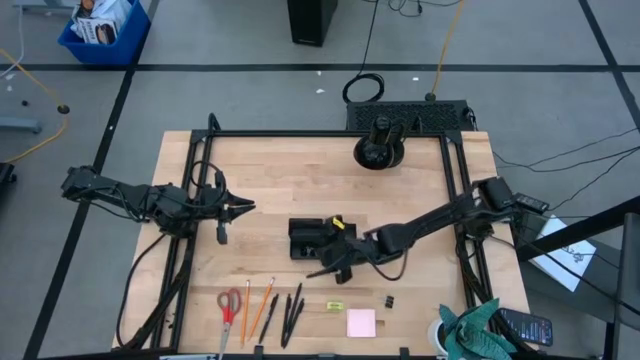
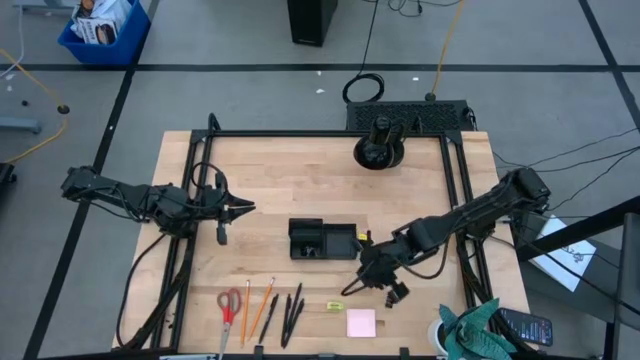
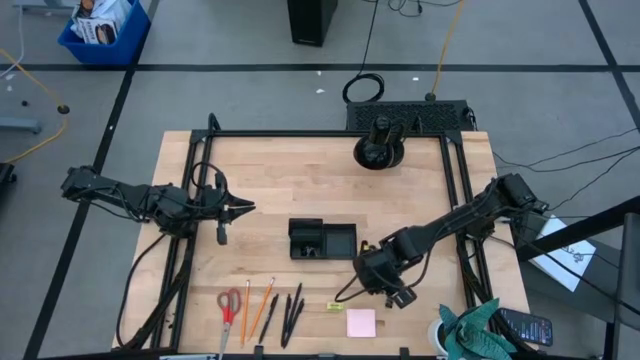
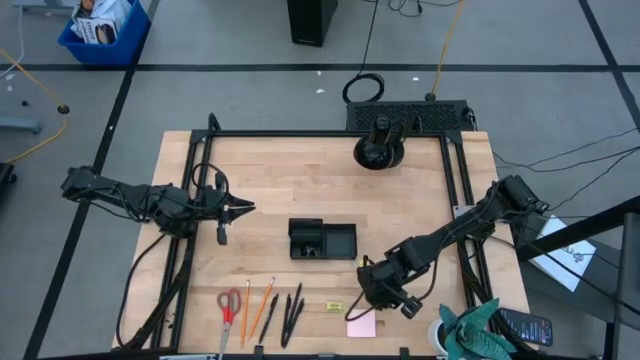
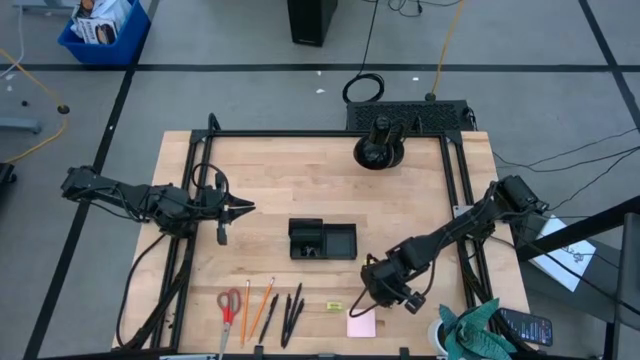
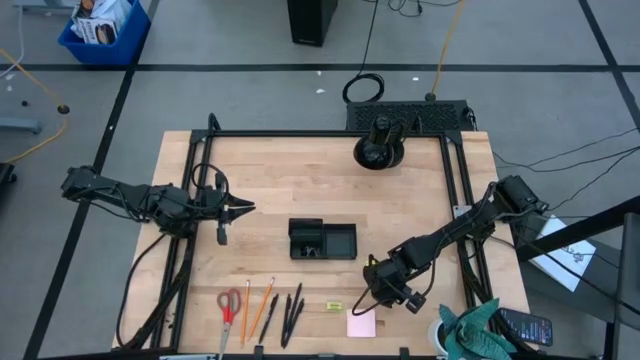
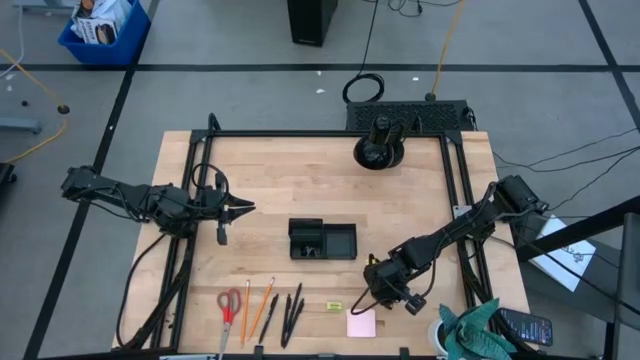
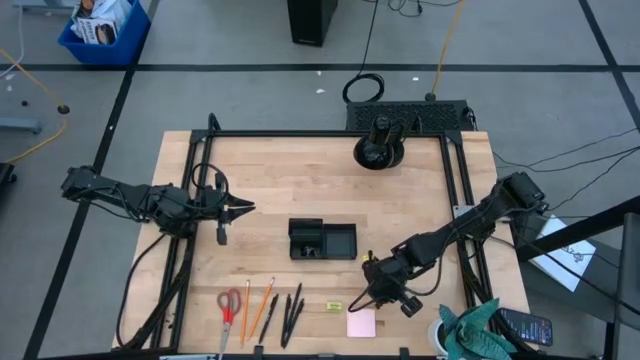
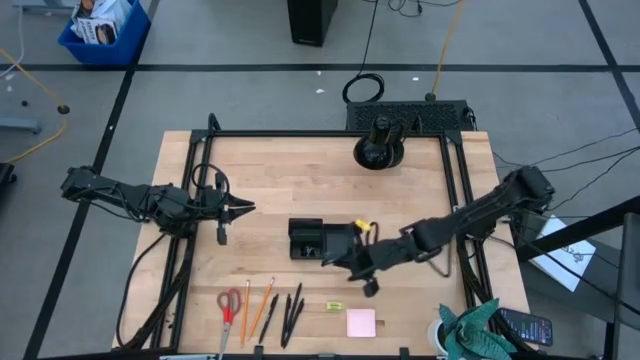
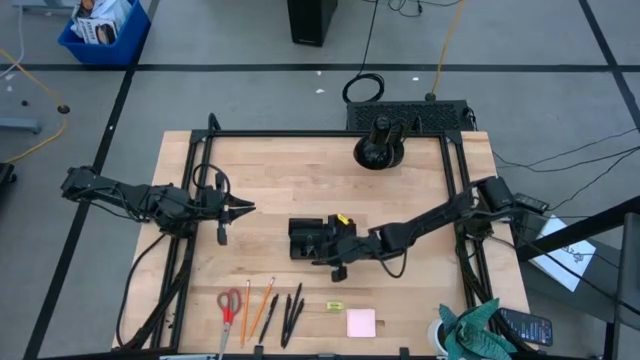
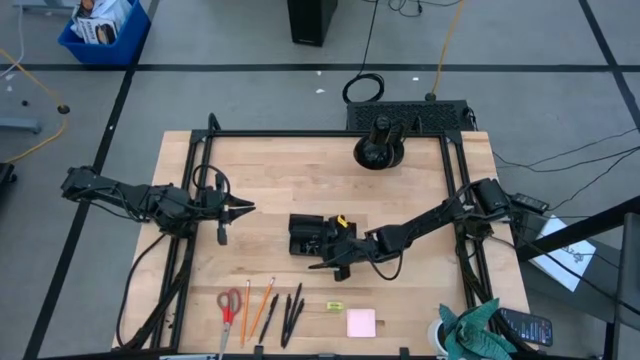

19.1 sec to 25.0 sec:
Task: Pick and place office supplies into organizer
Put the black binder clip into the black desk organizer

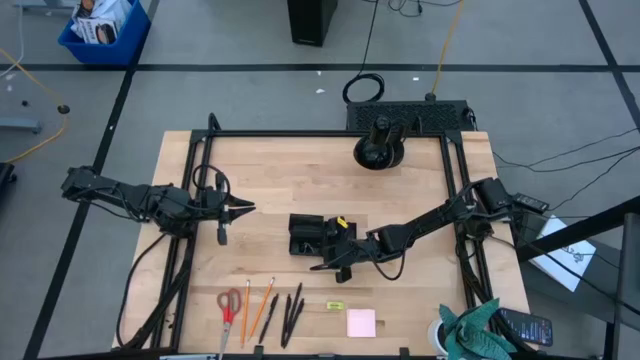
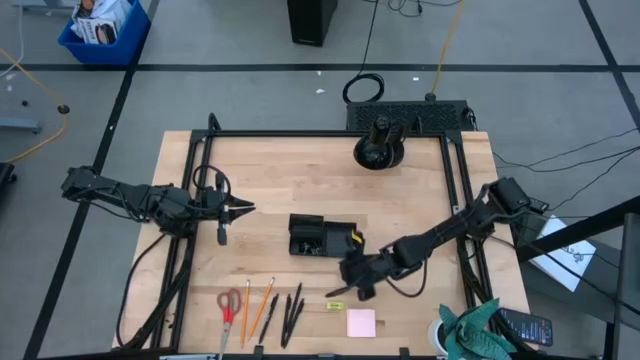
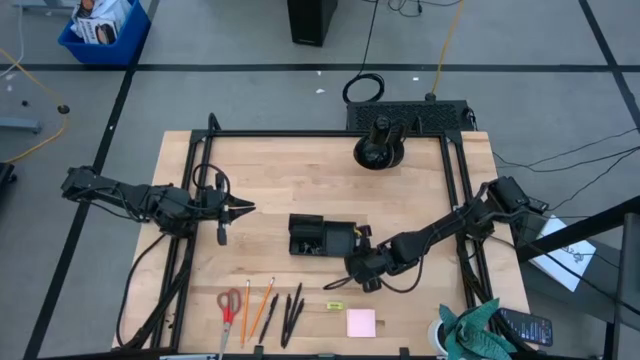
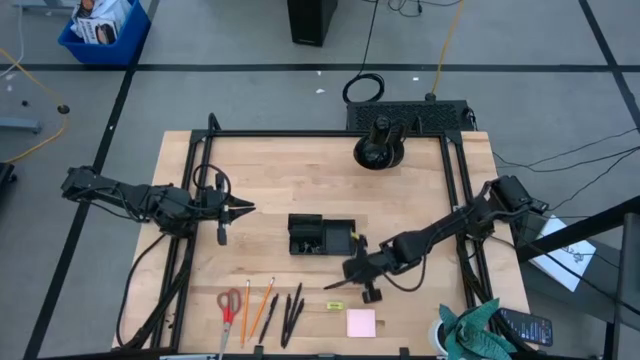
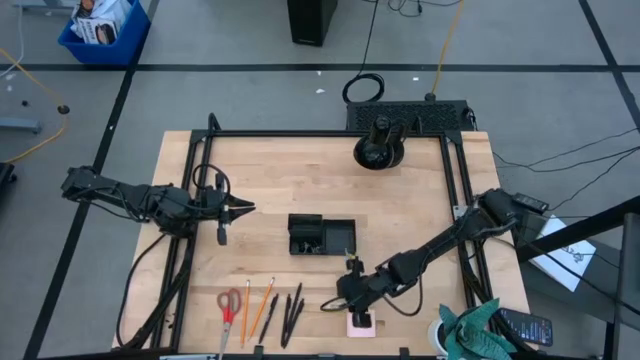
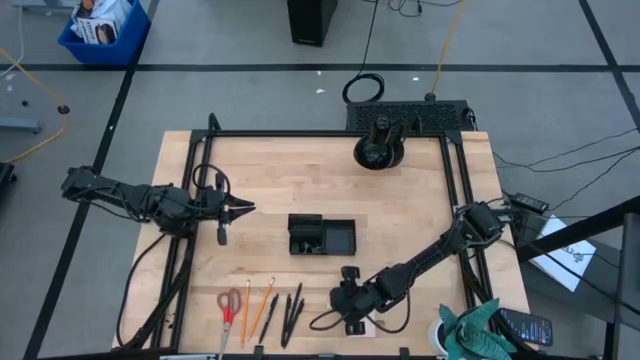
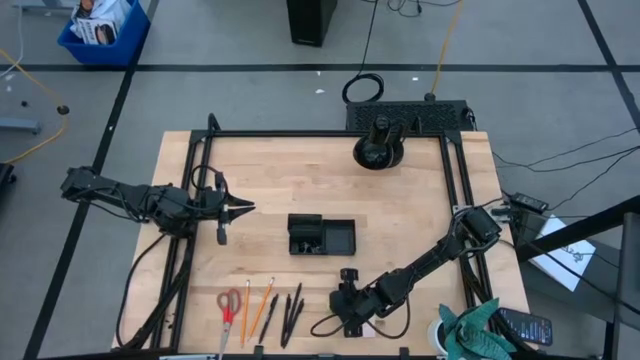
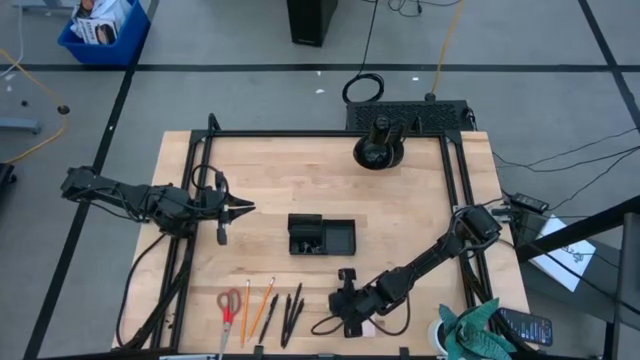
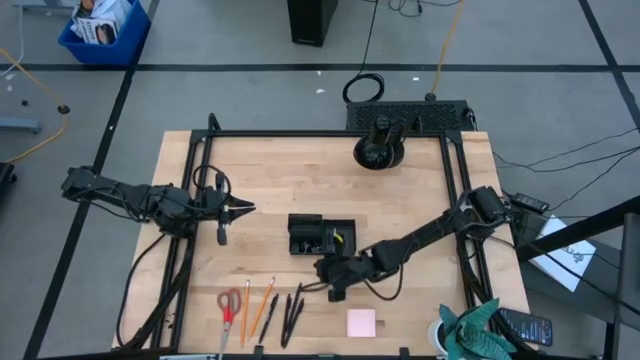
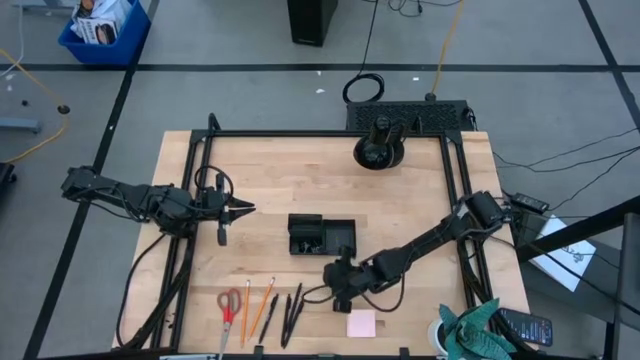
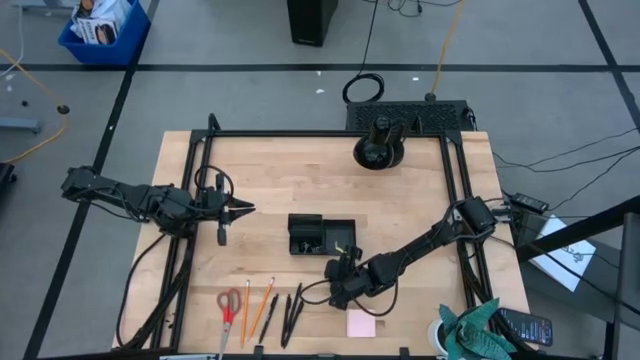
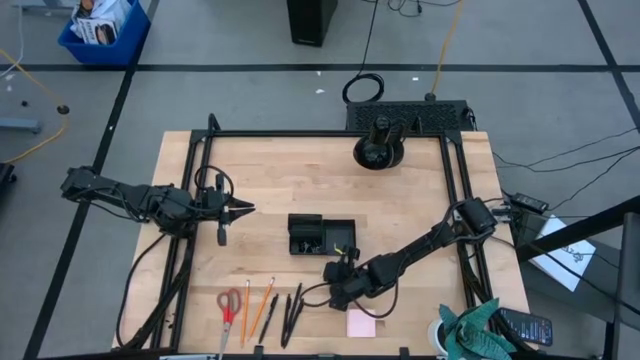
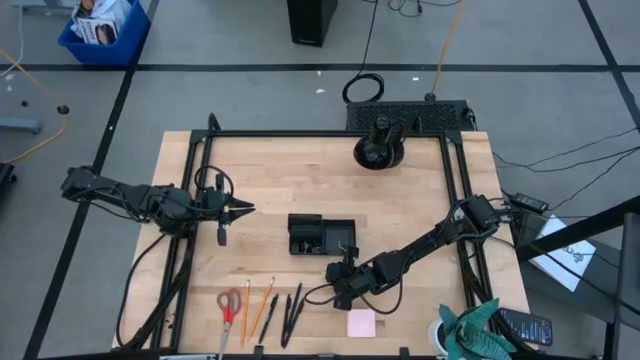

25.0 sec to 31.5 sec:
Put the yellow eraser into the black desk organizer

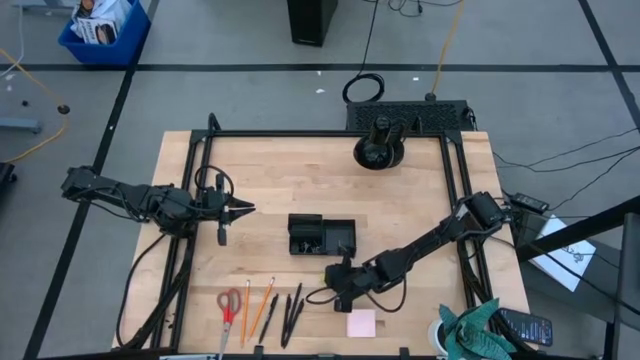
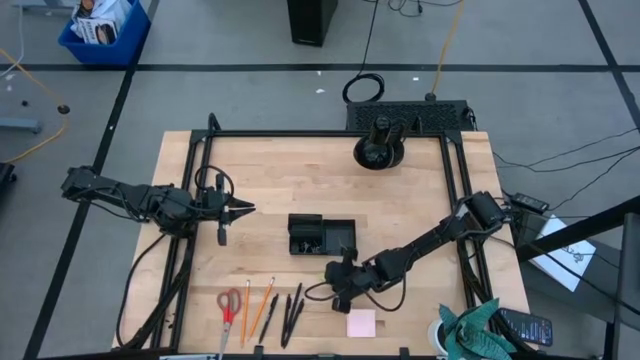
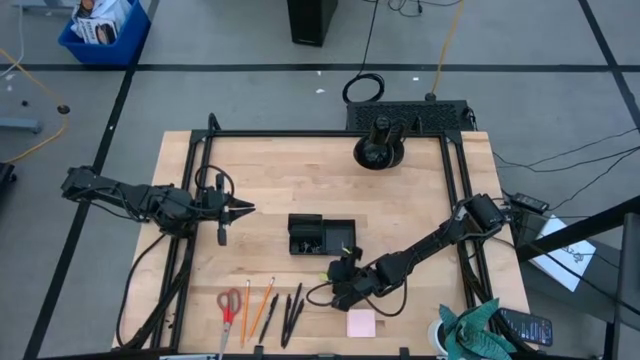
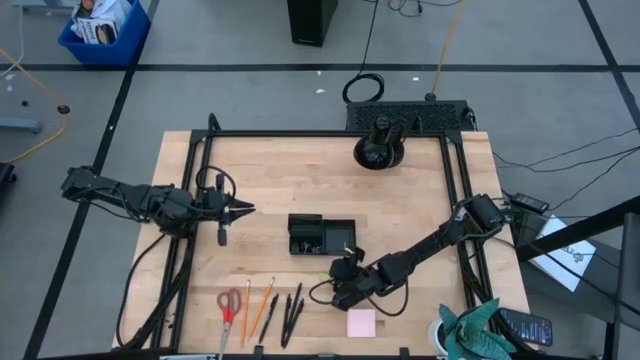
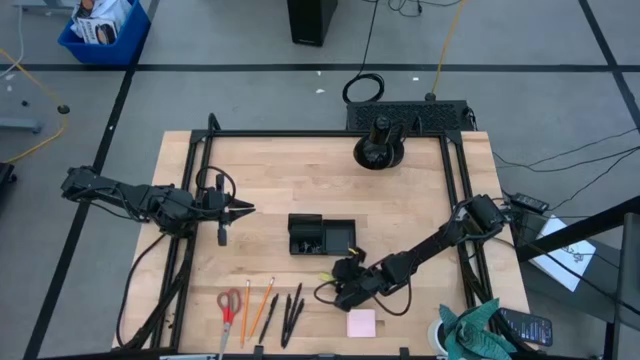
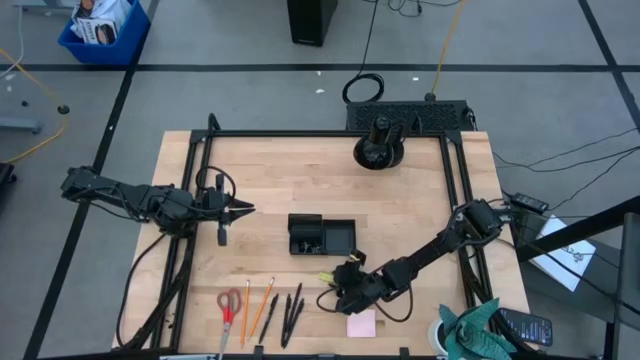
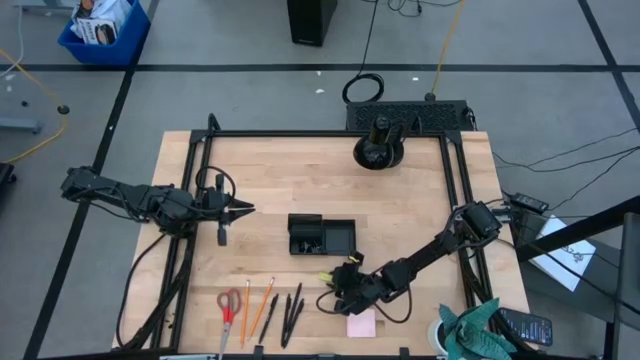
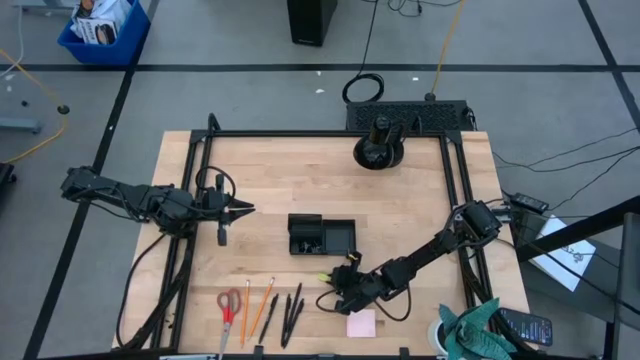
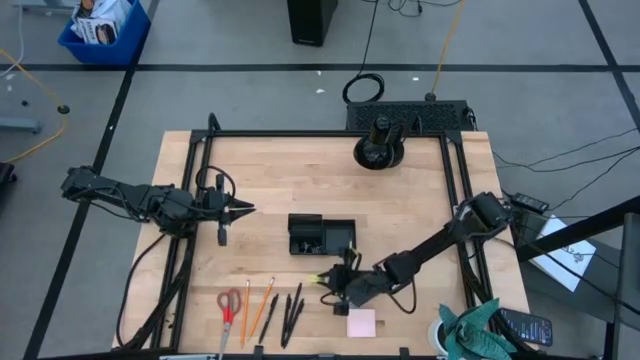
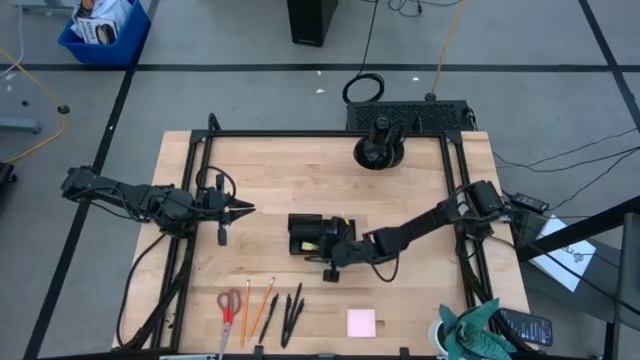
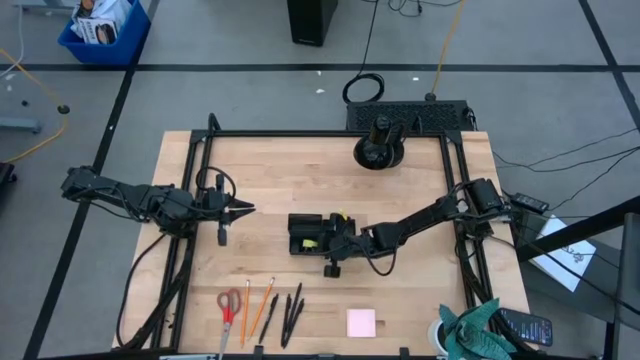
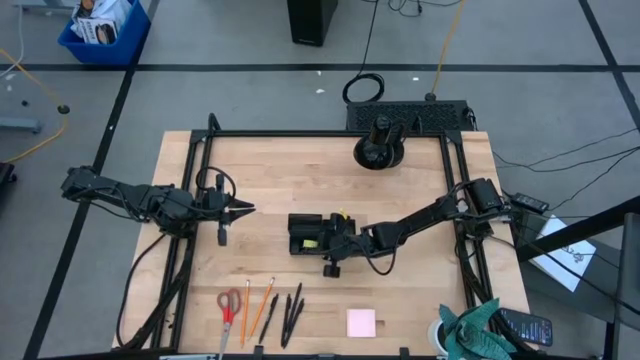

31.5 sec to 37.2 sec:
Put the yellow eraser into the black desk organizer

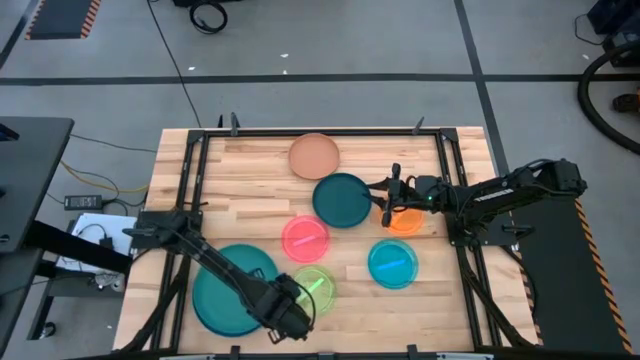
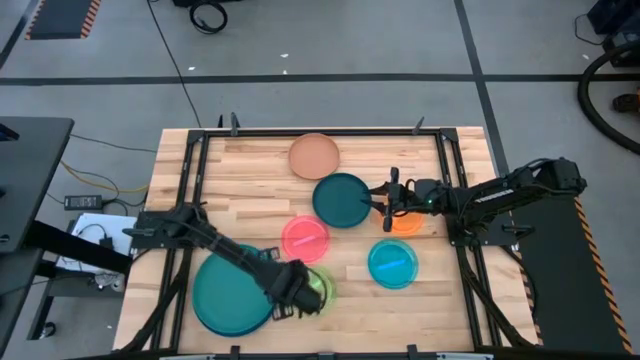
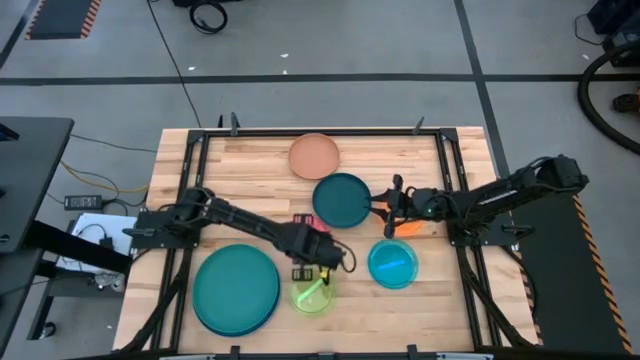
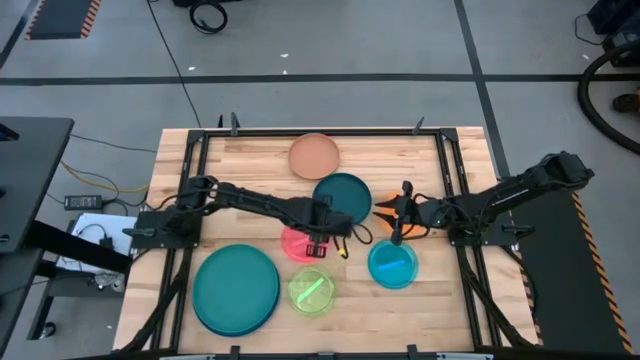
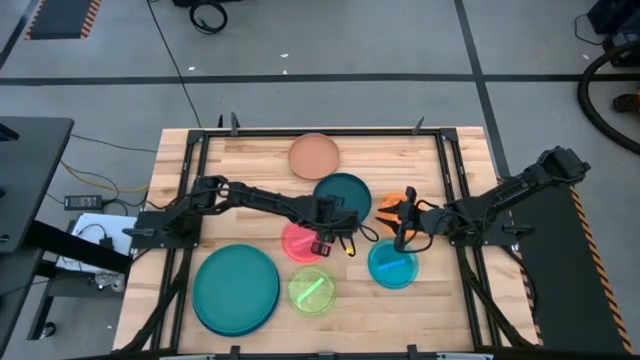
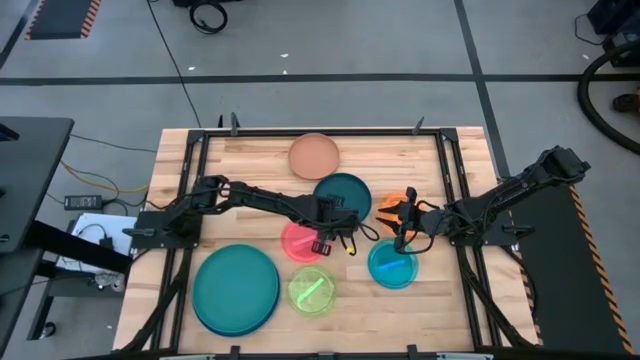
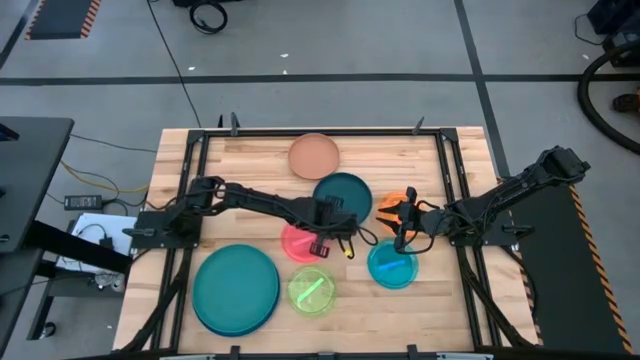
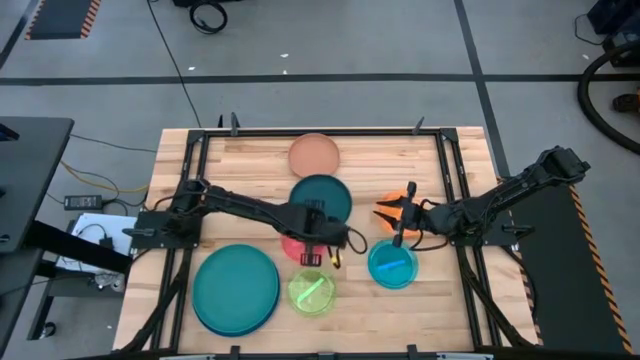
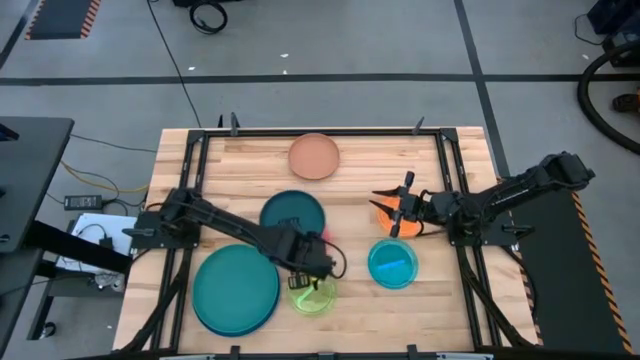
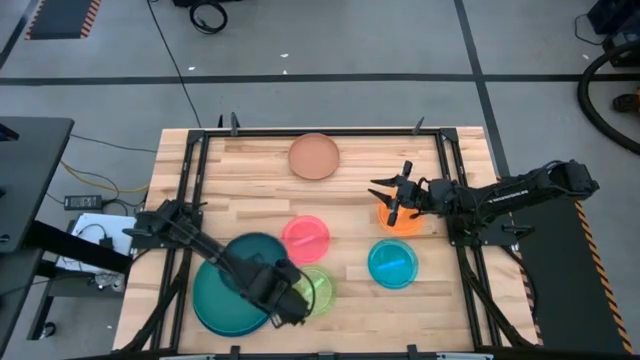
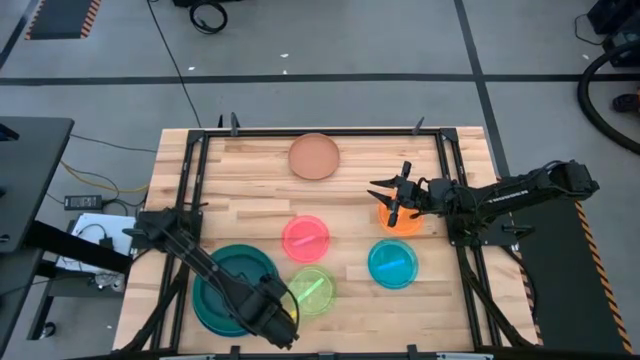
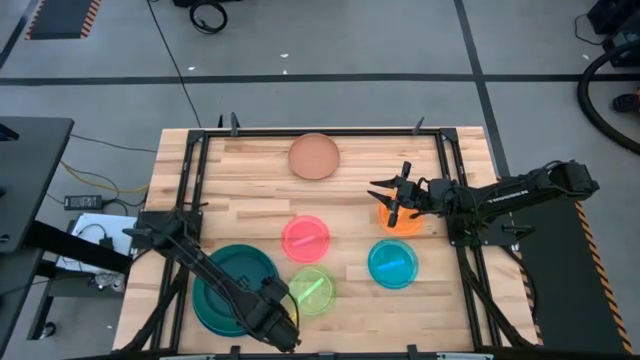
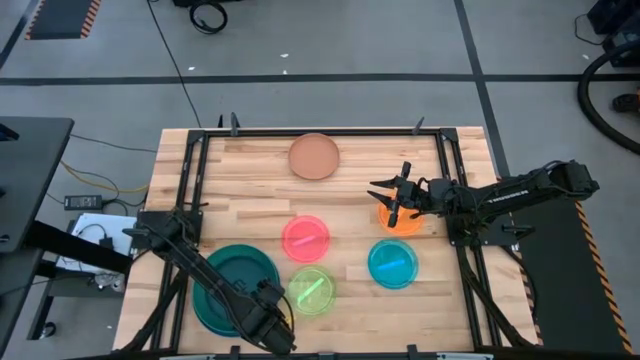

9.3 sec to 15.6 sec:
Task: Stack plastic plates
Stack the dark blue plate on top of the green plate
